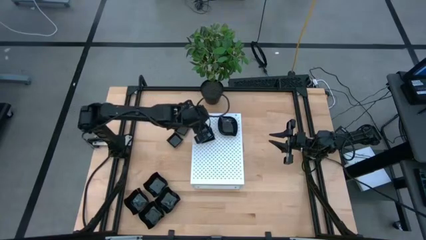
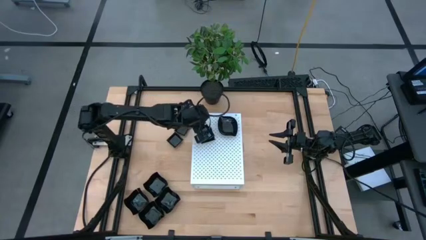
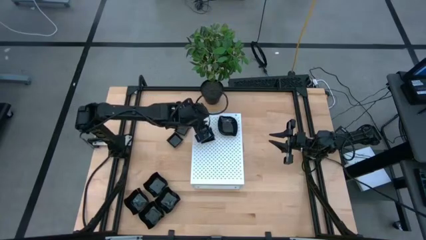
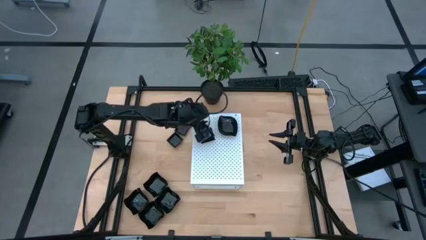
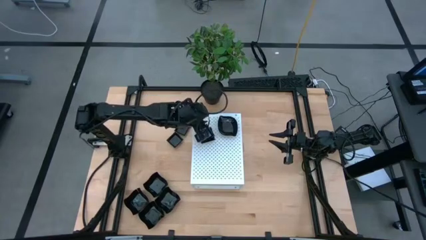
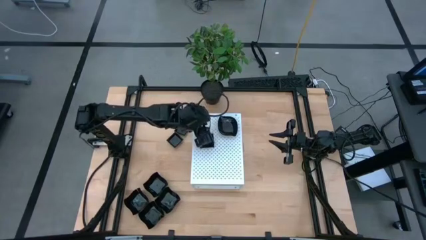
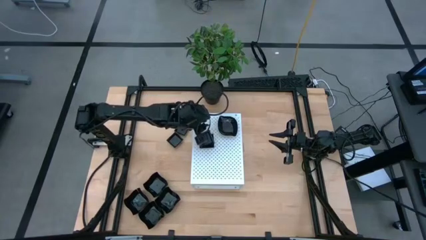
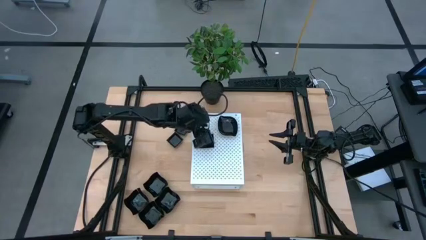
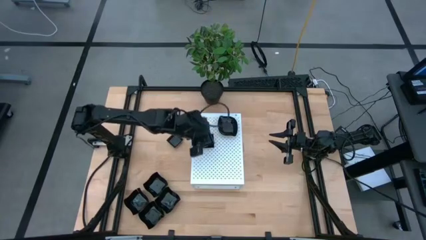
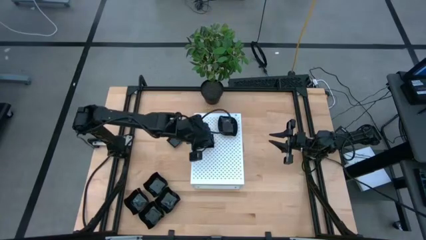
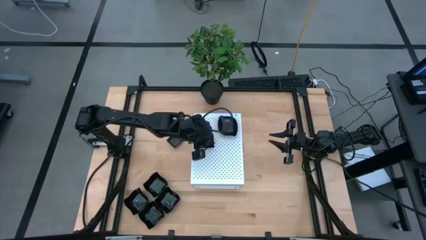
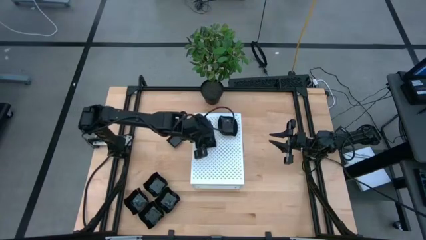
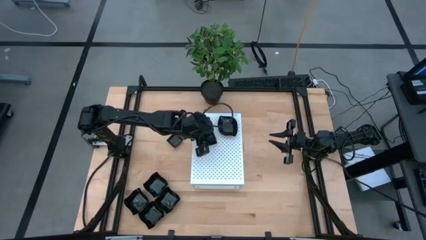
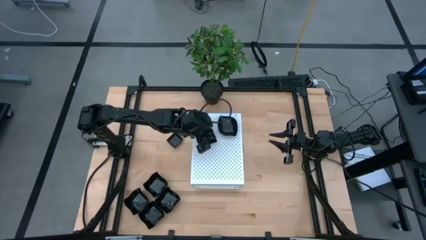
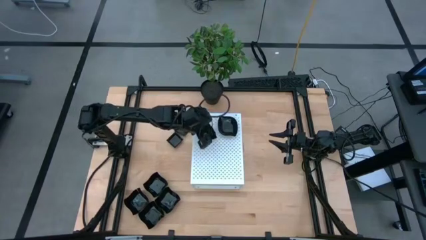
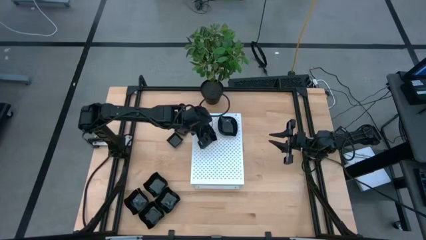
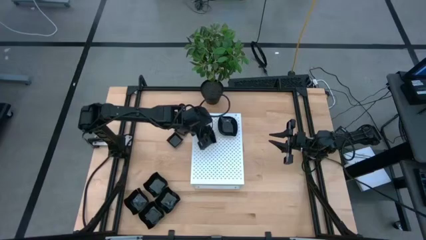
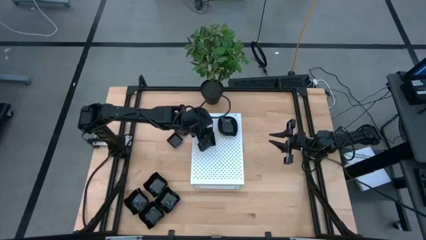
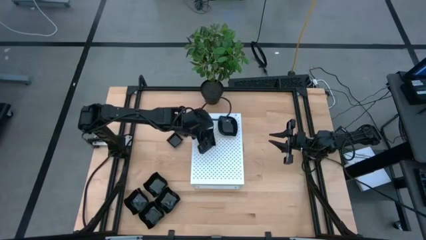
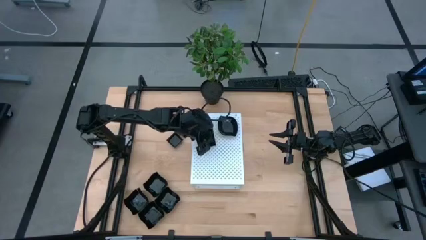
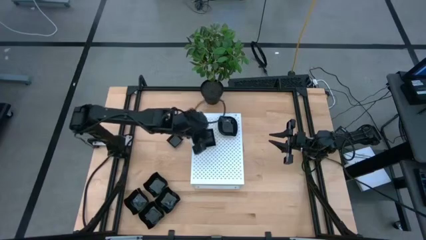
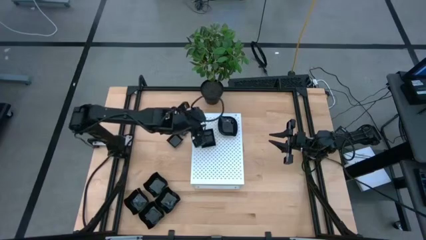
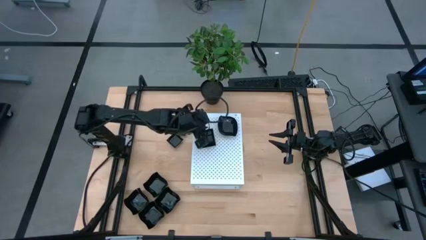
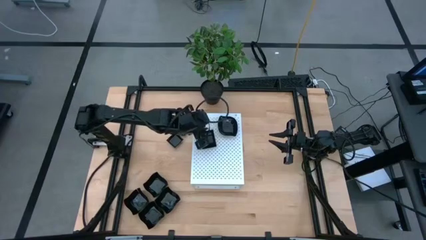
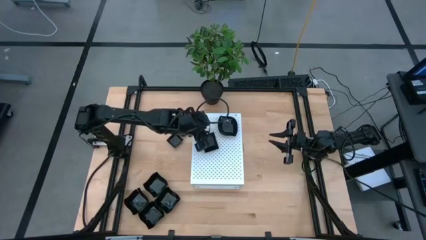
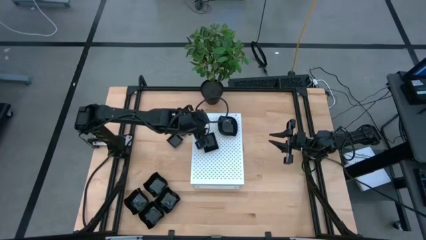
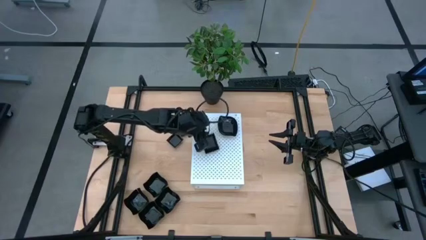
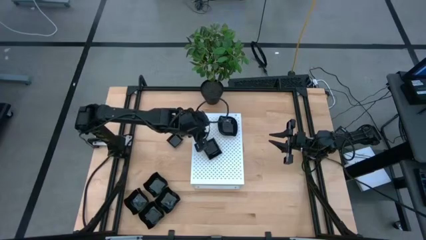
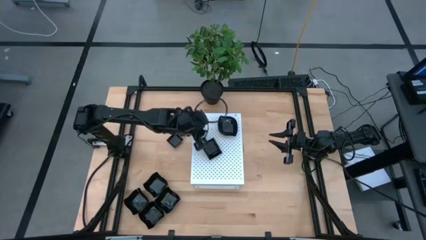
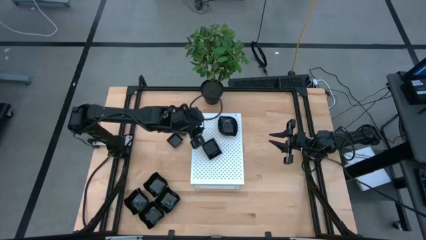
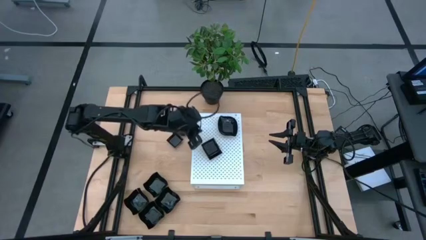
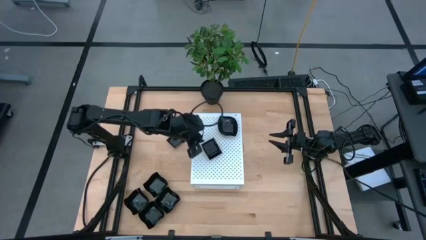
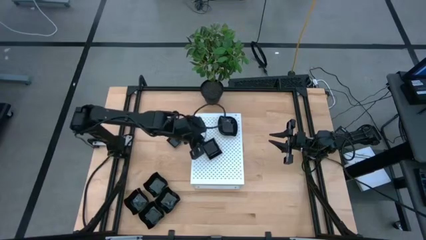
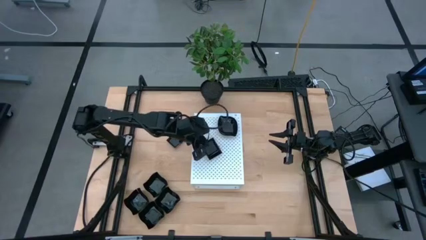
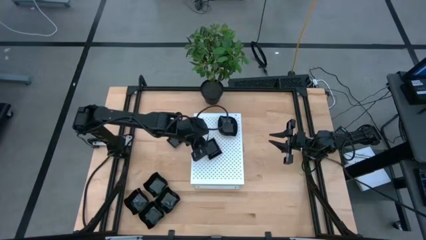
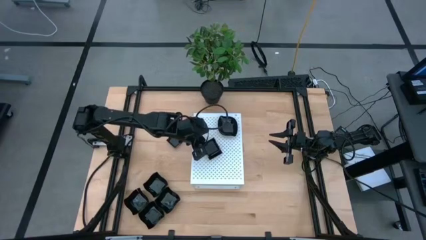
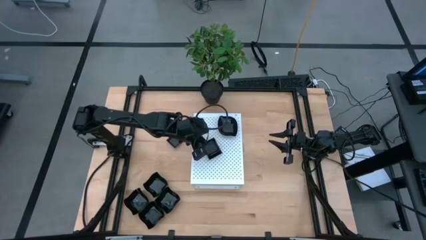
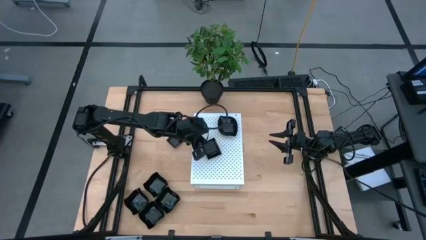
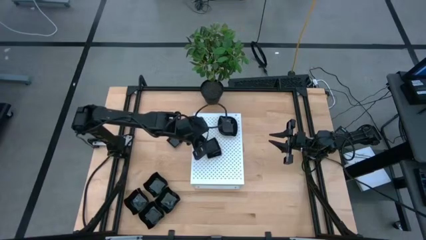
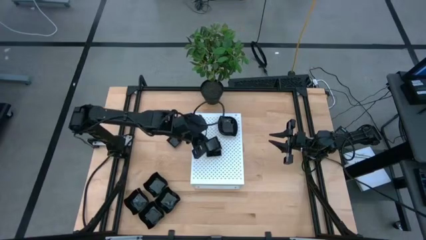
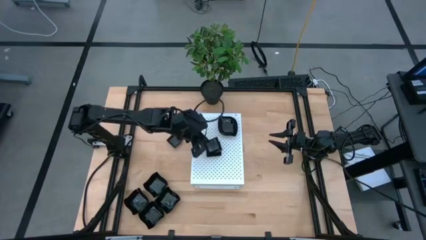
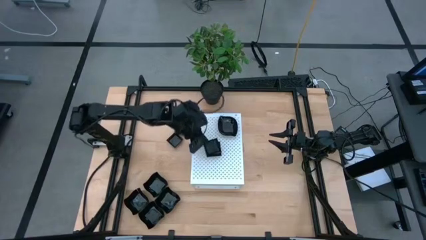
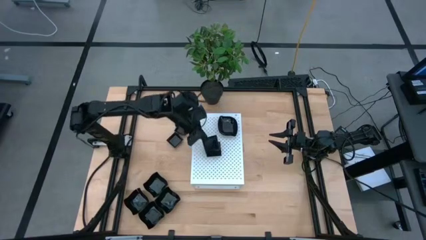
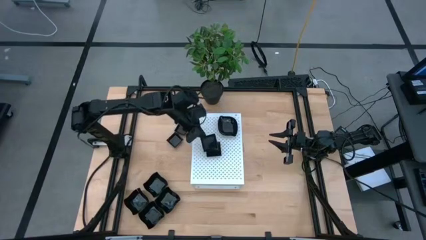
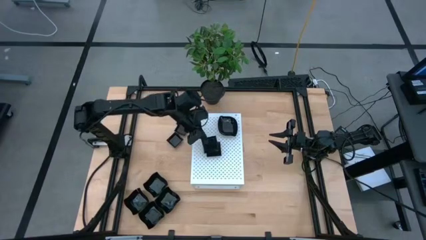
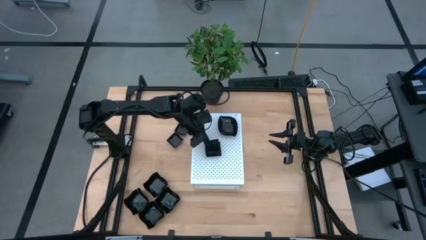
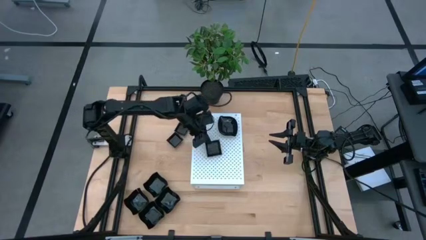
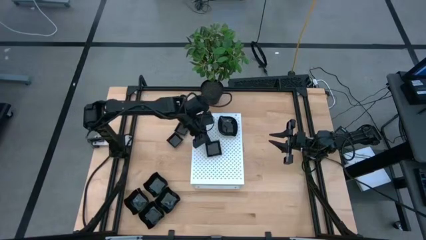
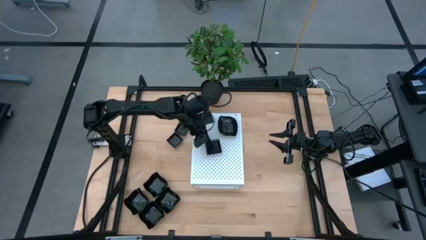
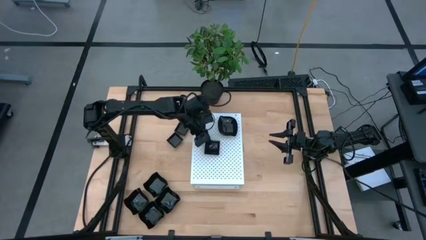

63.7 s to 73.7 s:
Task: Pick & Place Mini shaped plates
Stack the black square plate on top of the the black square plate on the shelf

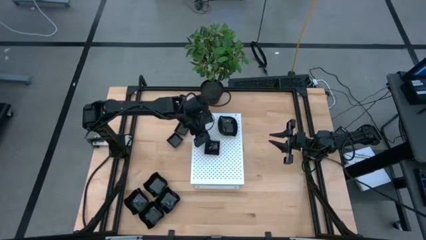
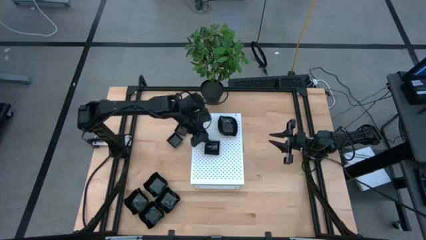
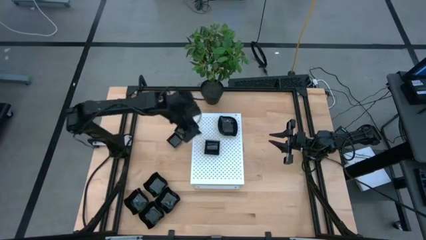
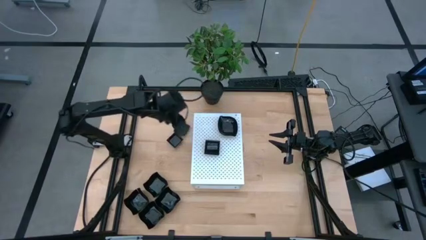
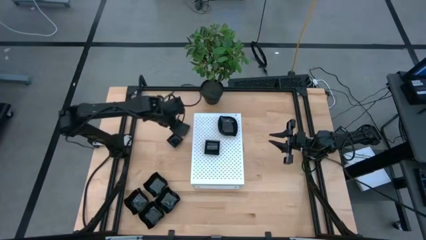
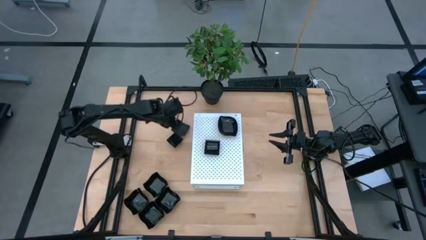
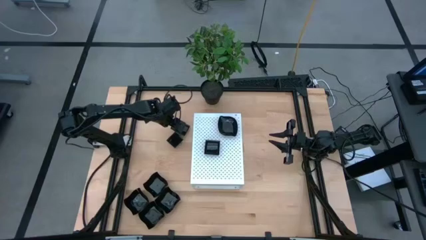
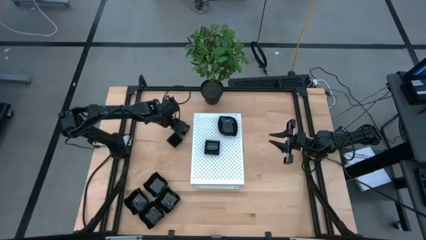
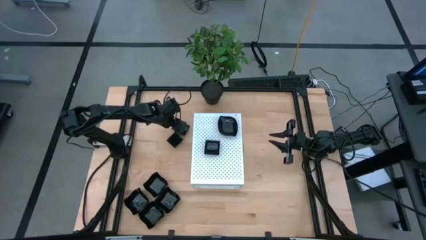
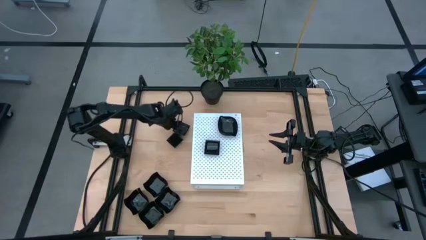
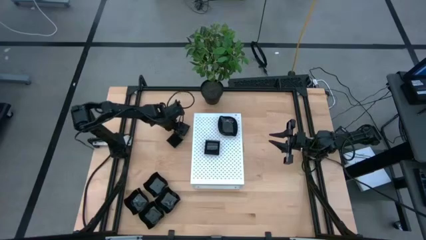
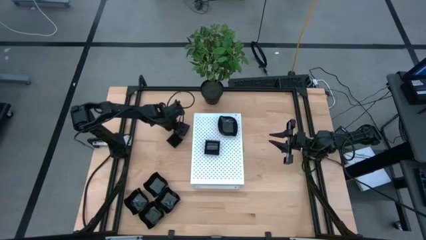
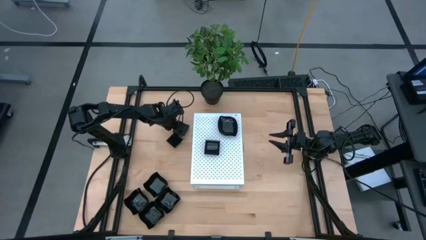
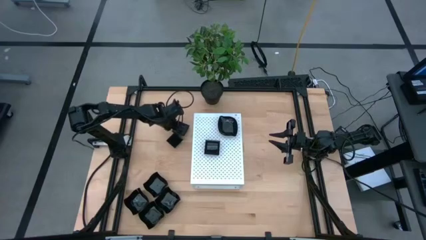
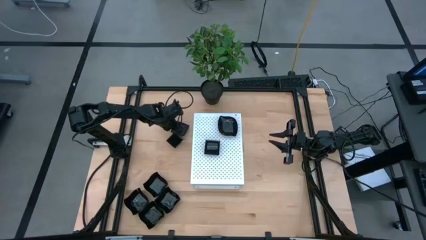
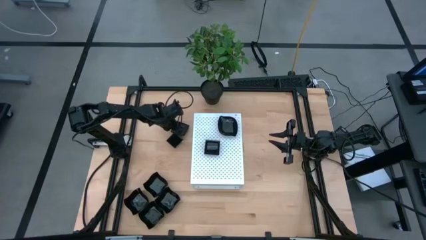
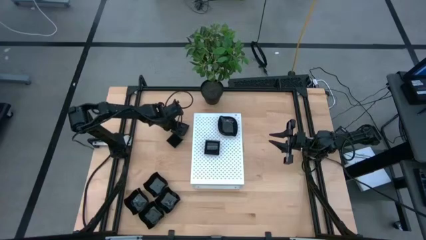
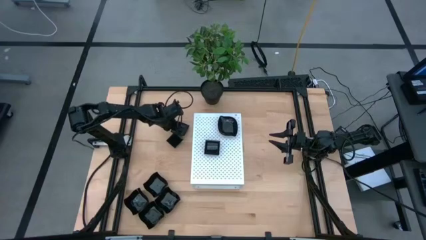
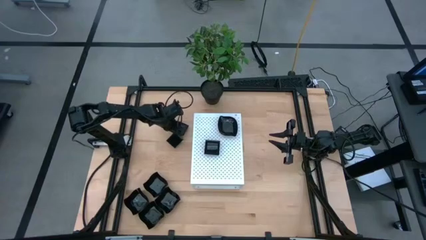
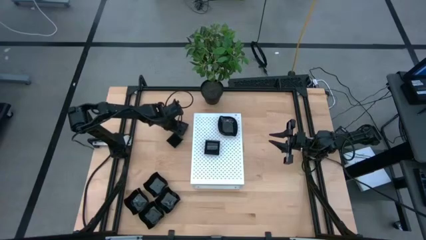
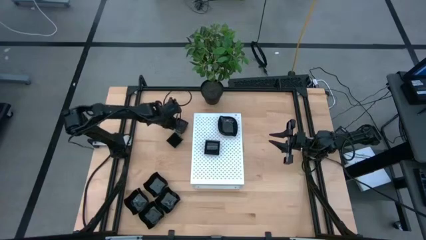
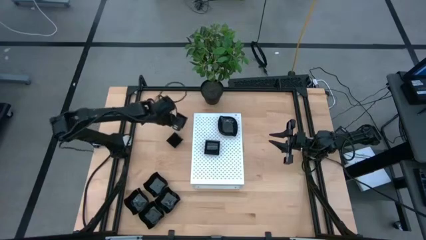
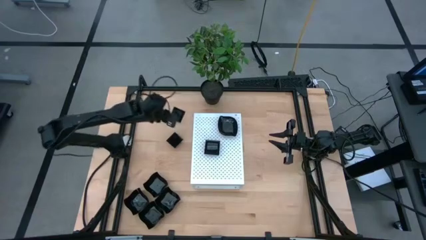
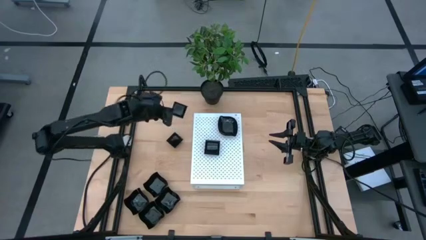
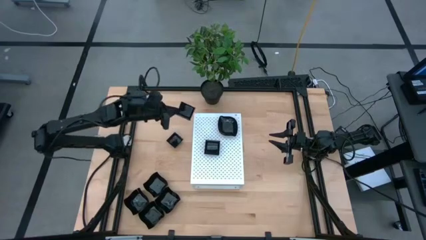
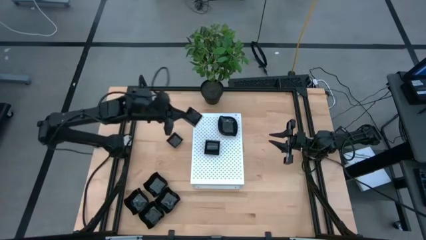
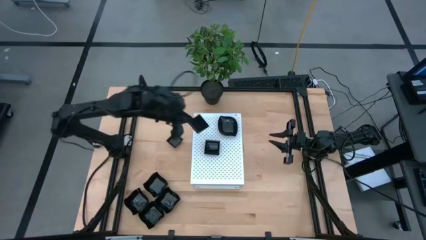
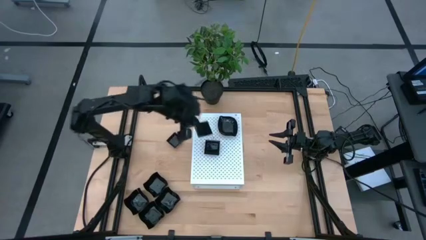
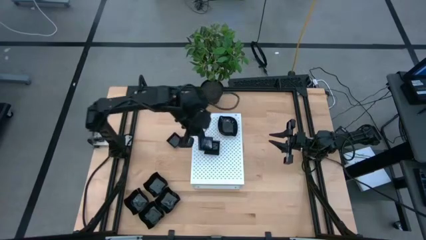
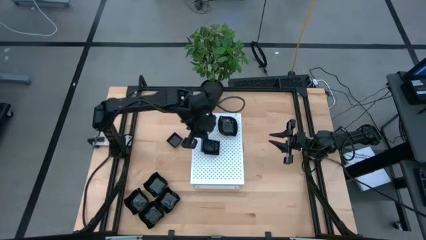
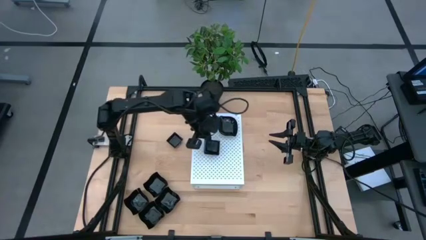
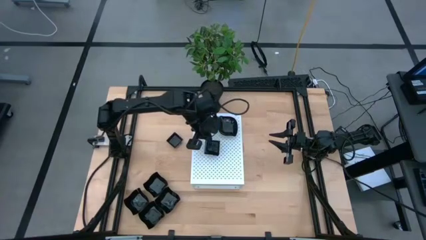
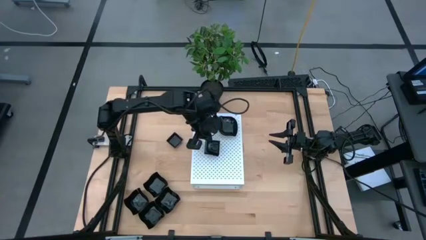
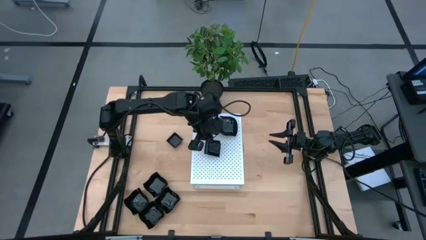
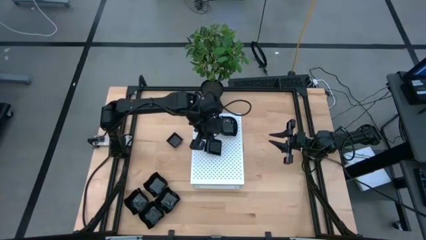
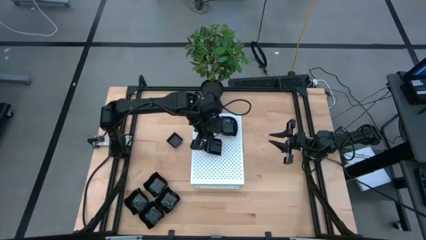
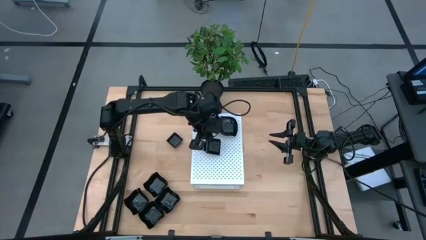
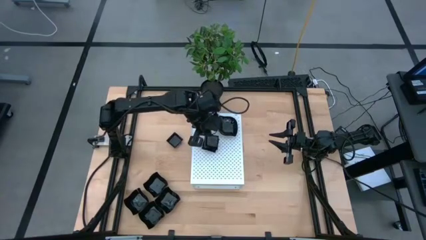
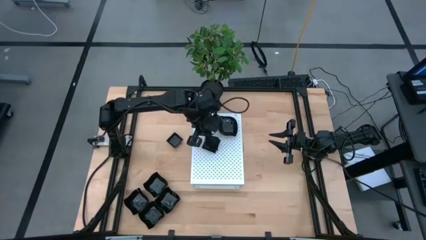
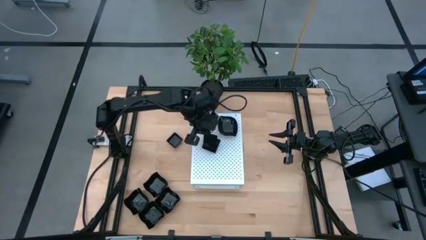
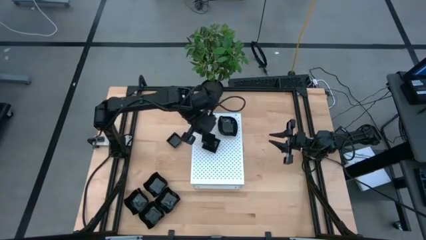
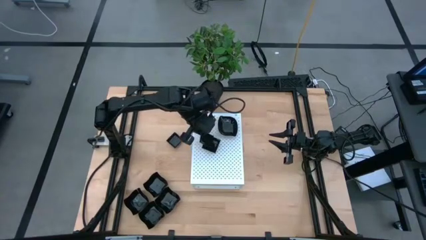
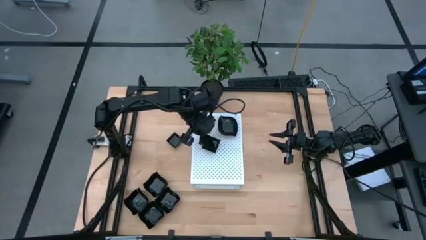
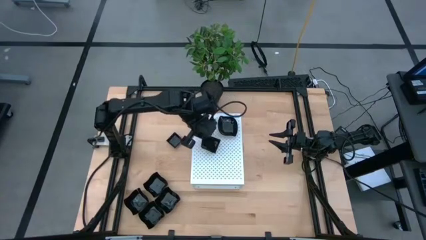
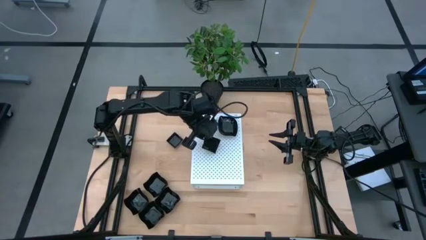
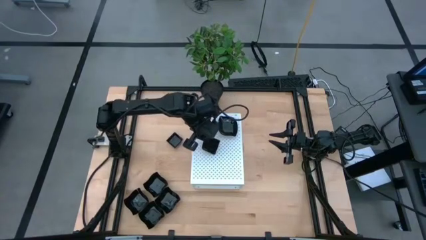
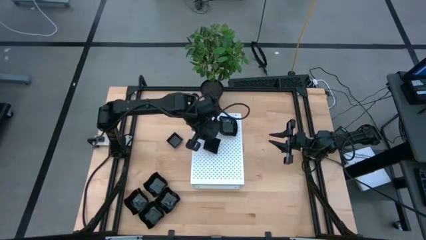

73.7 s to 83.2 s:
Stack the black square plate on top of the the black square plate on the shelf
